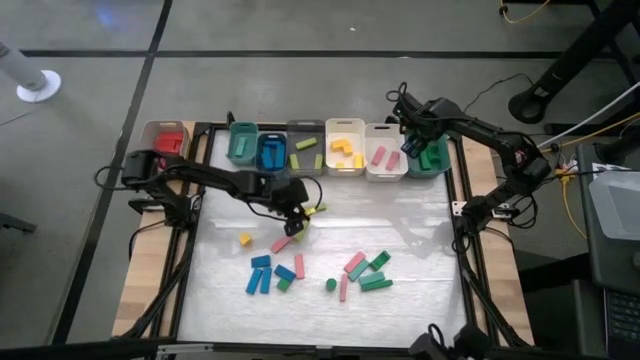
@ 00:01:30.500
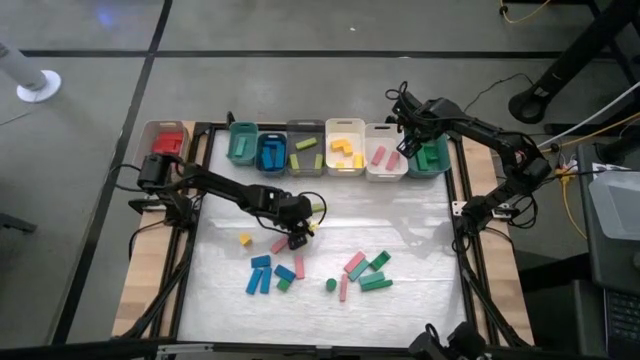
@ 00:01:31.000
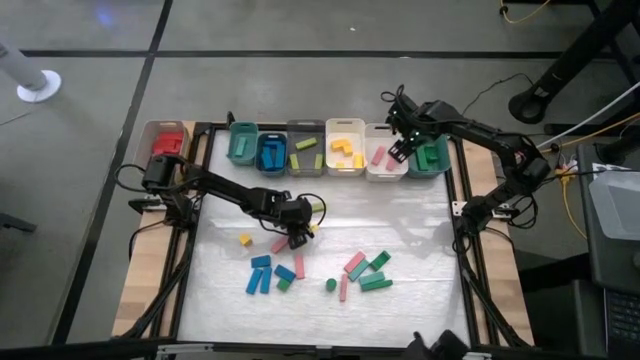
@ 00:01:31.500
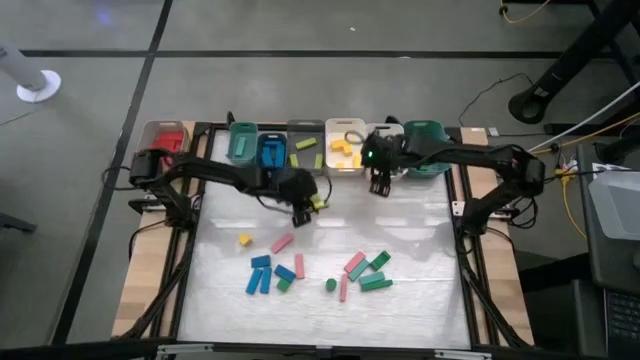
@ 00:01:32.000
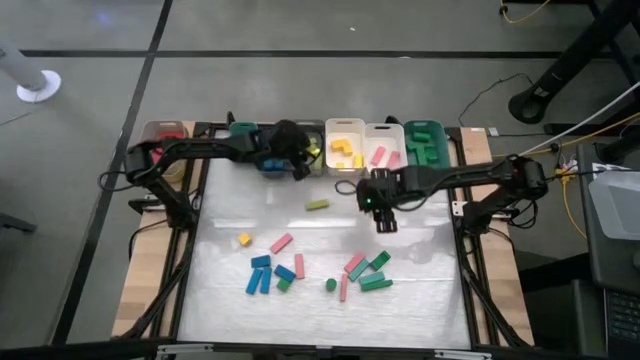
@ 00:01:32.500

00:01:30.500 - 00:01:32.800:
Task: Sort blocks
Put the light green block into the grey bin

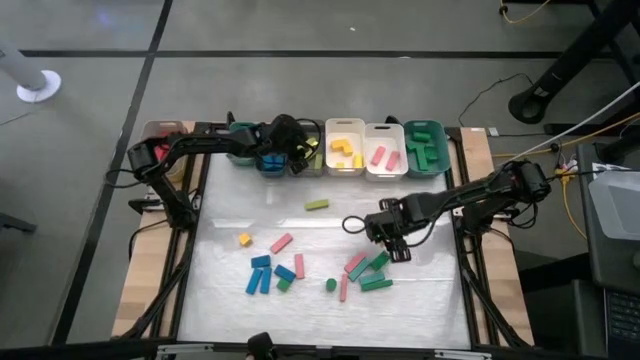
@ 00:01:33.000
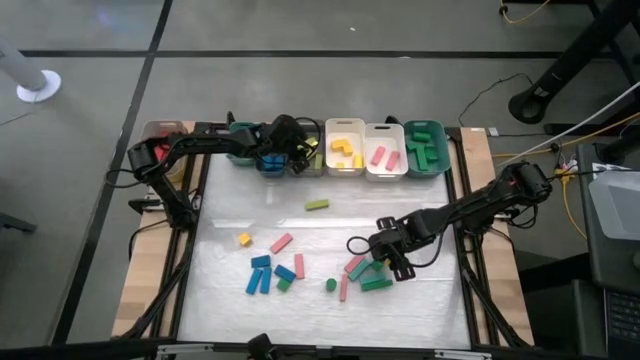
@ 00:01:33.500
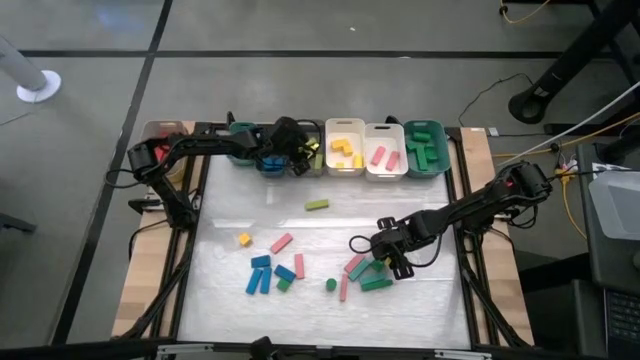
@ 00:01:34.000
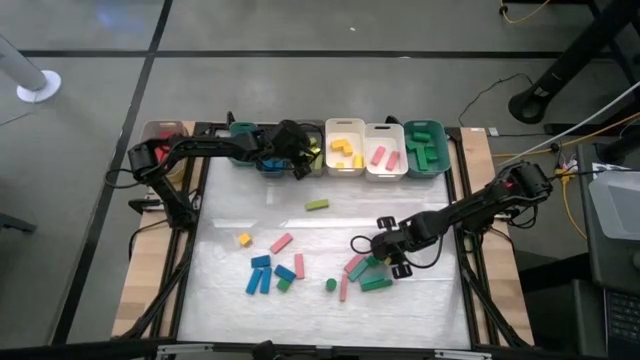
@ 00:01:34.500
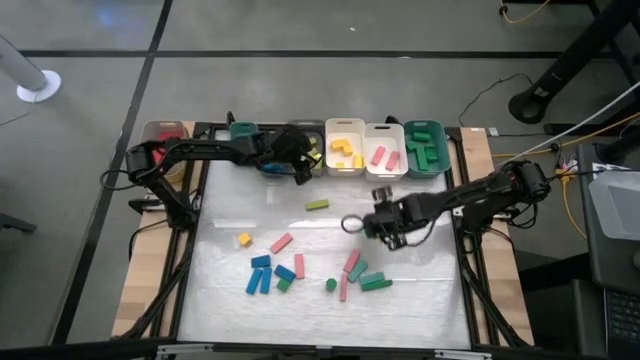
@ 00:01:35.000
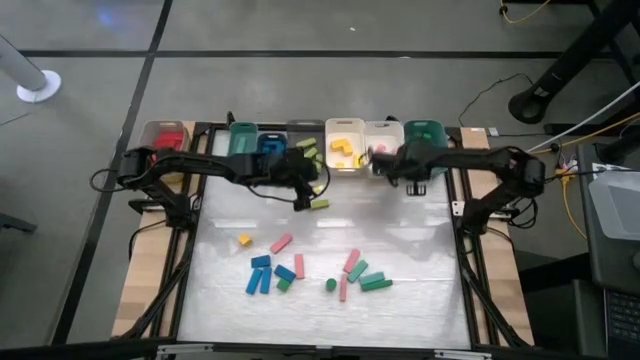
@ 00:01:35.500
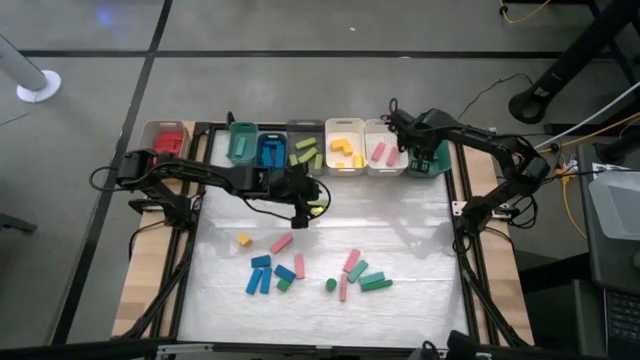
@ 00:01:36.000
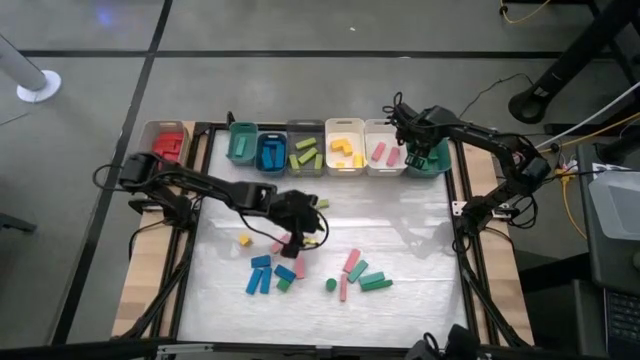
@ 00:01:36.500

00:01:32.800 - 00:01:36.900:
Put the green block into the right green bin

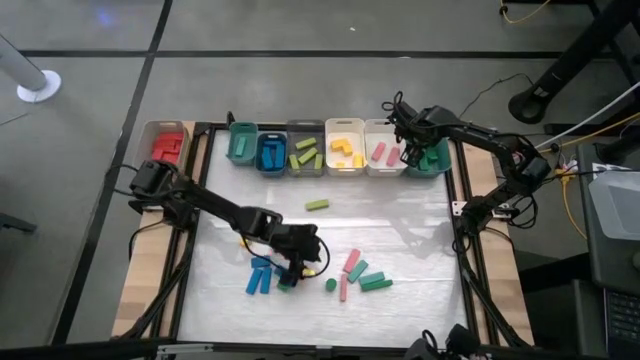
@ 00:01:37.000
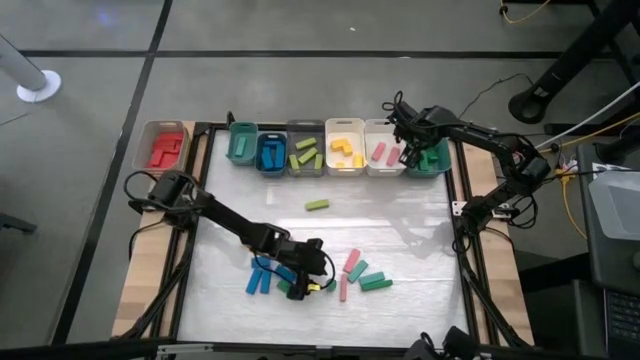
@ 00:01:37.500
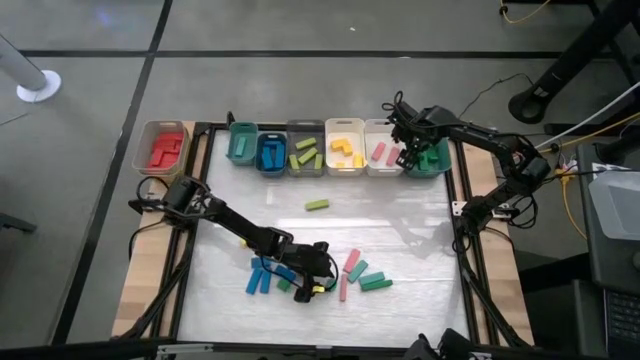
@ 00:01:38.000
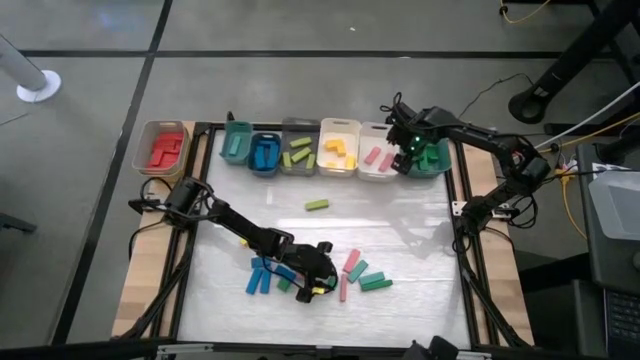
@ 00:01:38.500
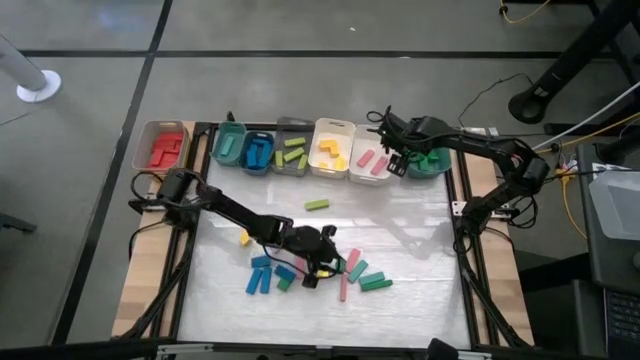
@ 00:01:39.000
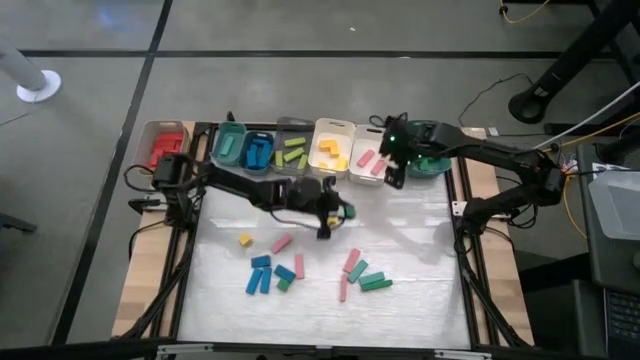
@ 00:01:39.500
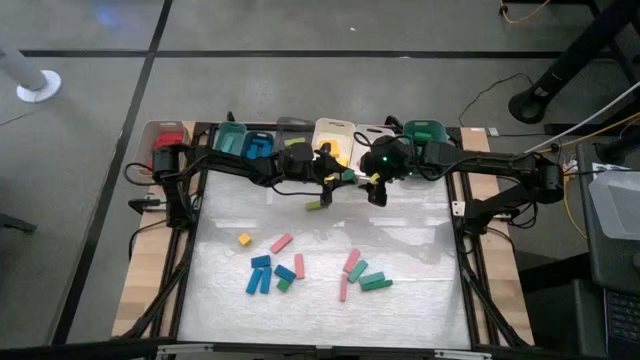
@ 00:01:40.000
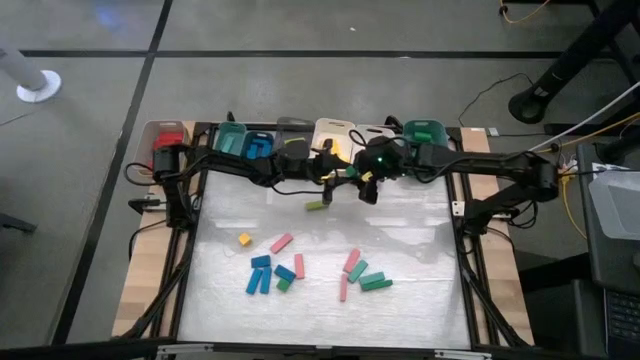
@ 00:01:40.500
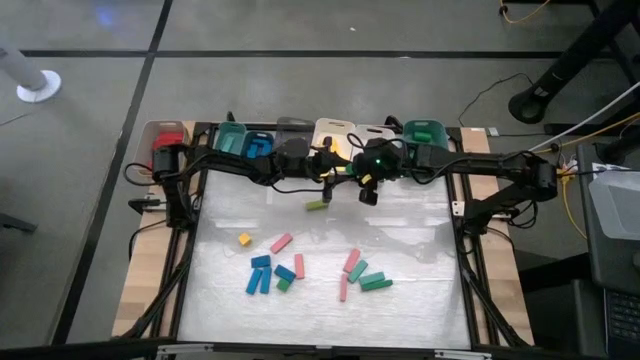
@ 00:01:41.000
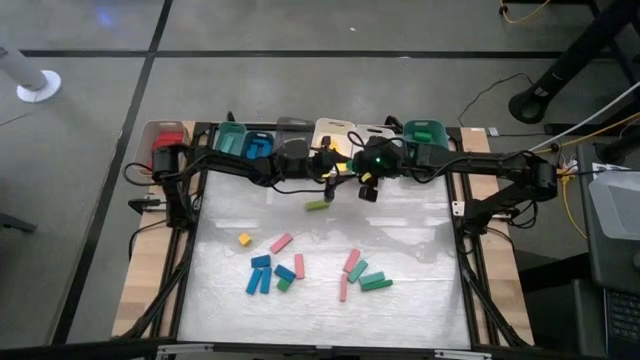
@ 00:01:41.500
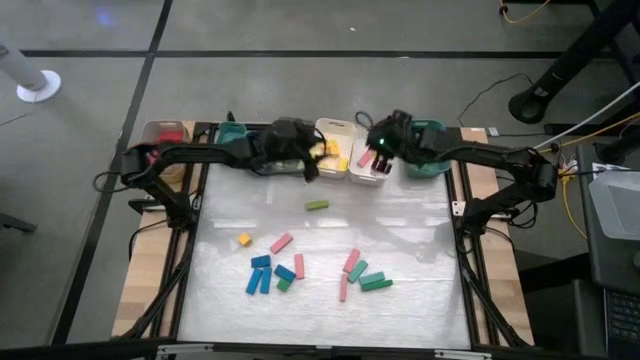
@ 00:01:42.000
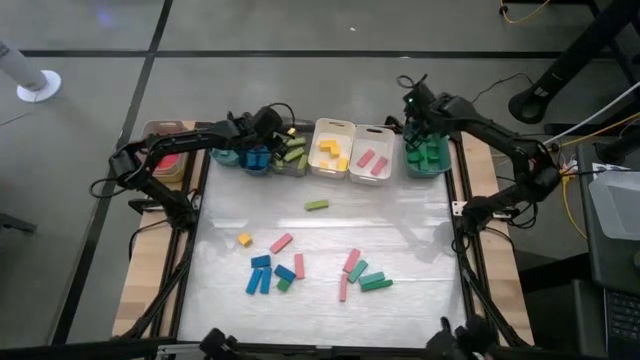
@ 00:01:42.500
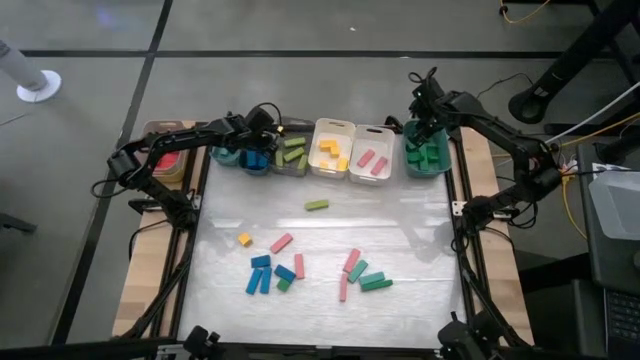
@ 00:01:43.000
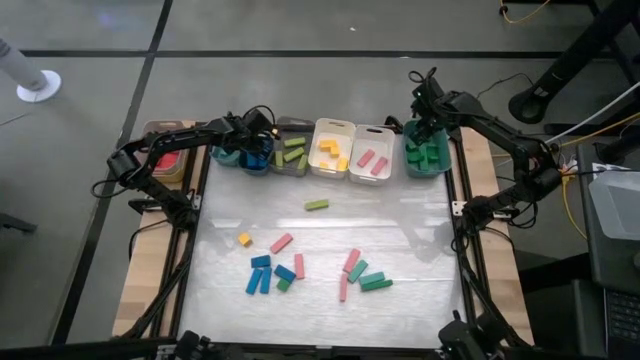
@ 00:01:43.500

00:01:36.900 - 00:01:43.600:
Put the green block into the right green bin

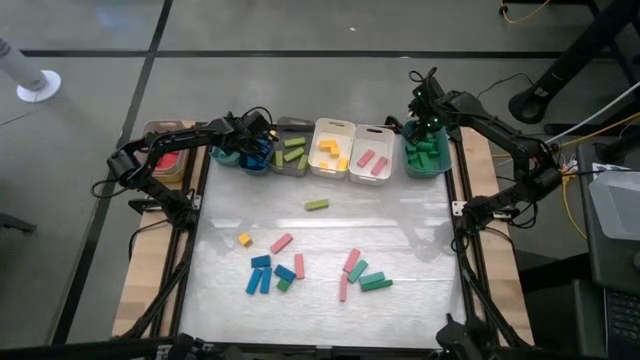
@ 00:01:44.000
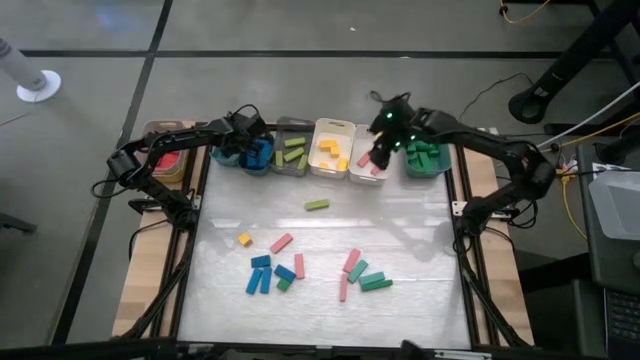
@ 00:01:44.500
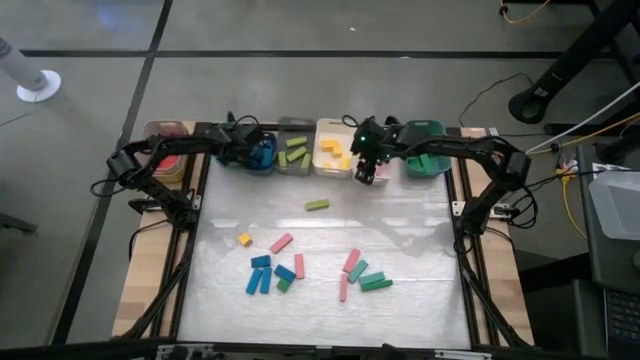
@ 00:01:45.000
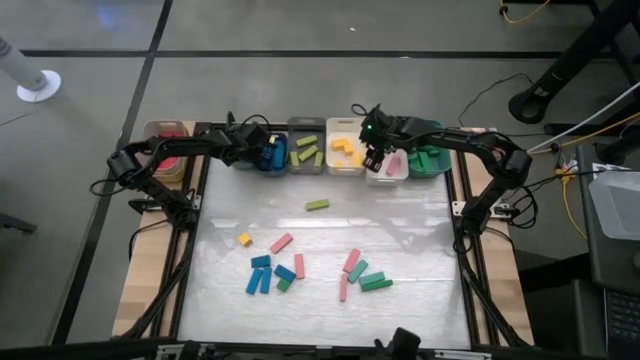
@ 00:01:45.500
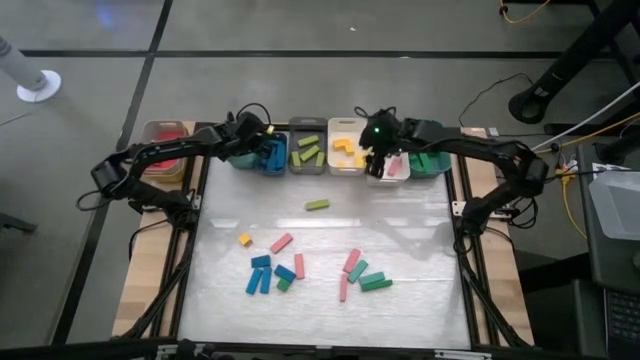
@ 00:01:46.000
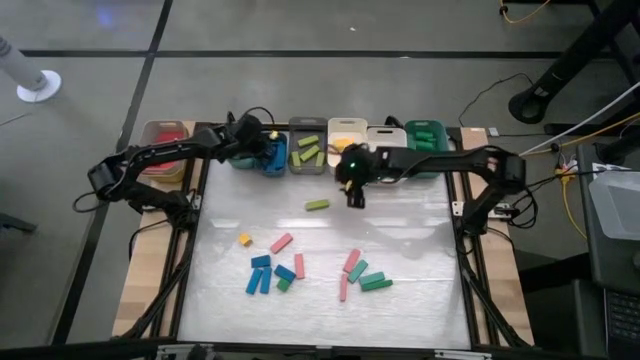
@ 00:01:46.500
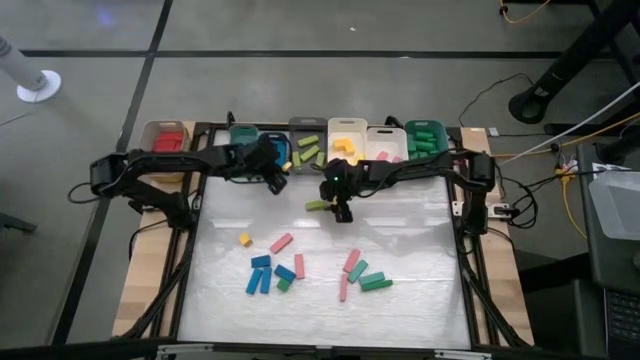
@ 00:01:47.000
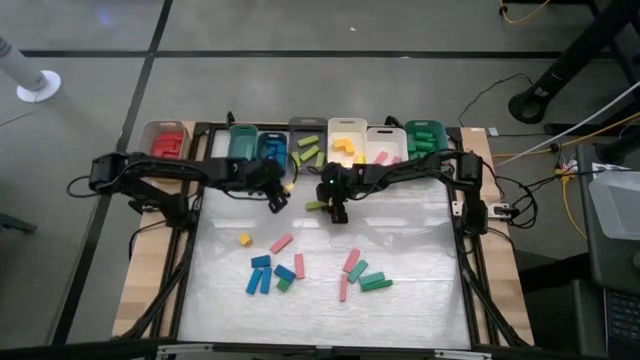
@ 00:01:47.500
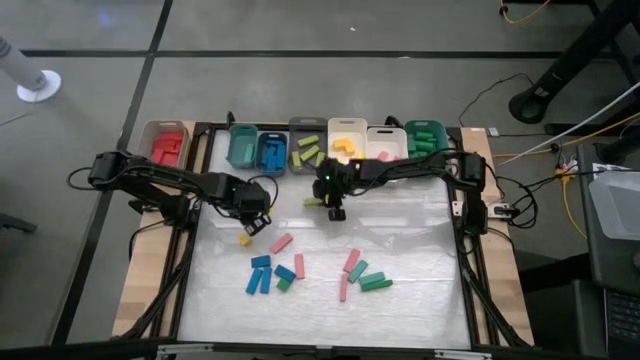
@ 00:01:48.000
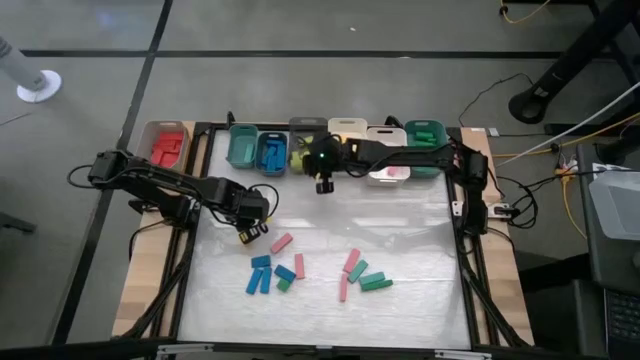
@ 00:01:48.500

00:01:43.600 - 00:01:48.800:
Put the light green block into the grey bin

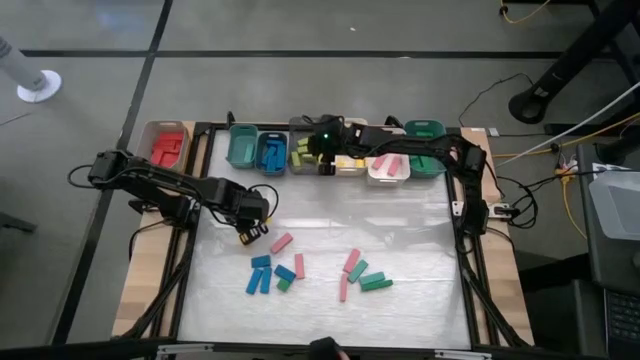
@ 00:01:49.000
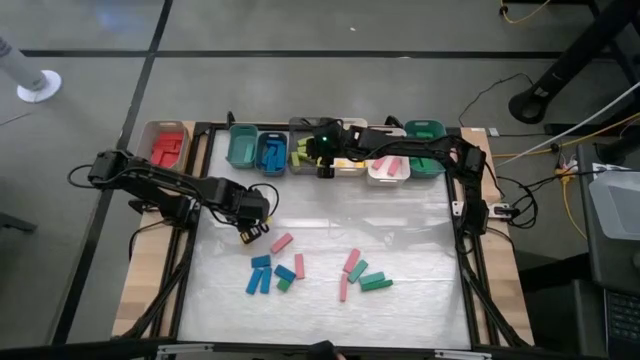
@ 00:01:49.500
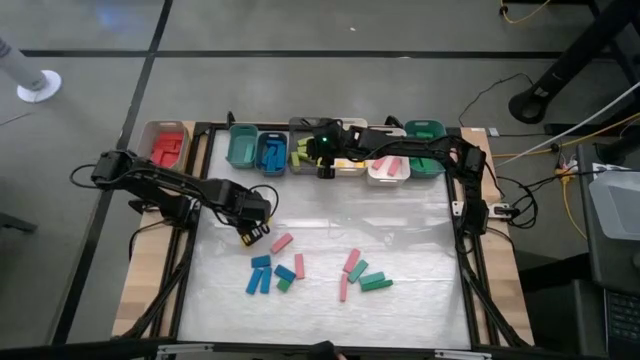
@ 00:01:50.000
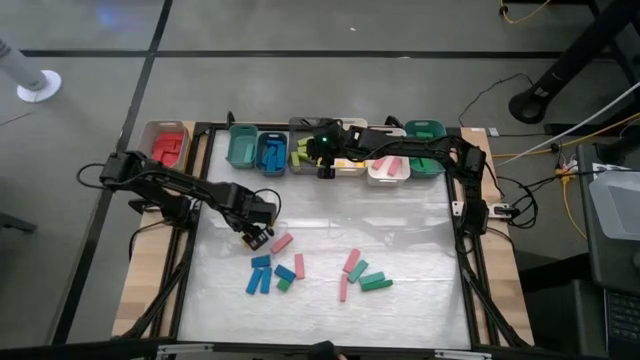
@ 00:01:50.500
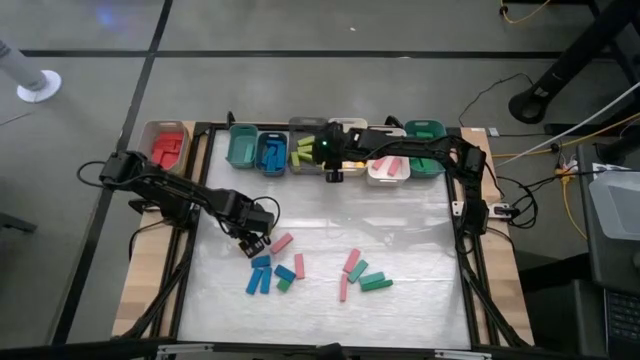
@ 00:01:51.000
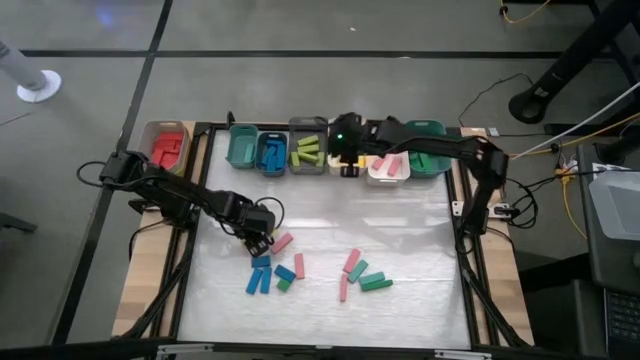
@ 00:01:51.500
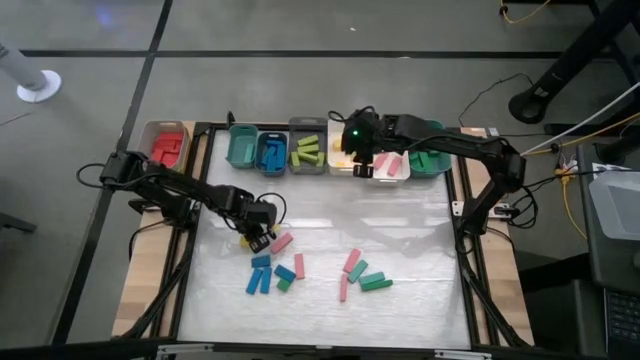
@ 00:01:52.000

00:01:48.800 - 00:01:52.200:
Put the yellow block into the left white bin
